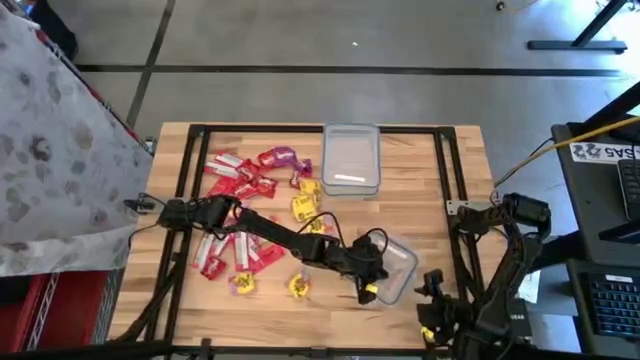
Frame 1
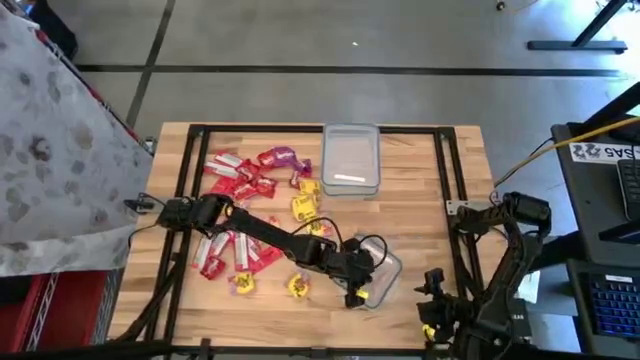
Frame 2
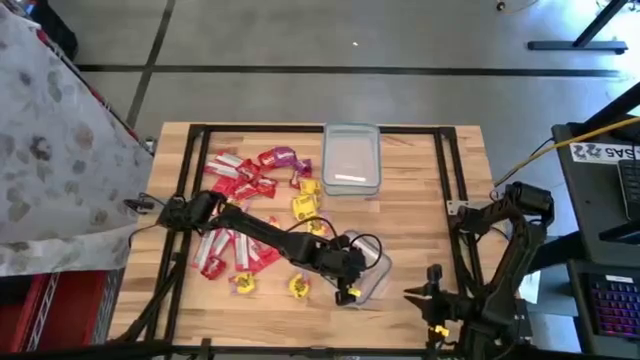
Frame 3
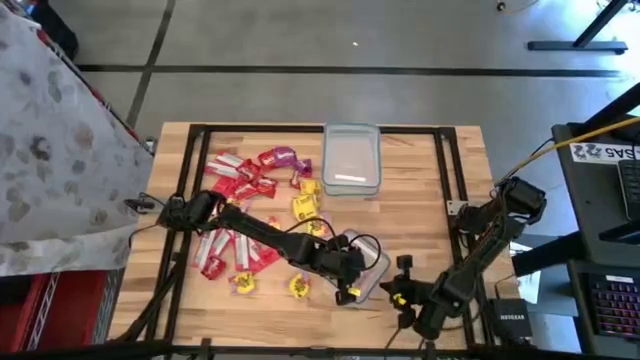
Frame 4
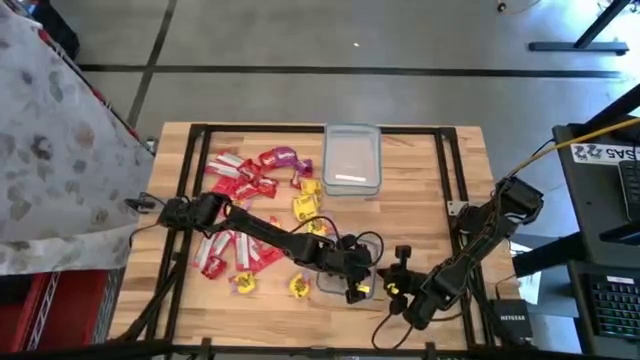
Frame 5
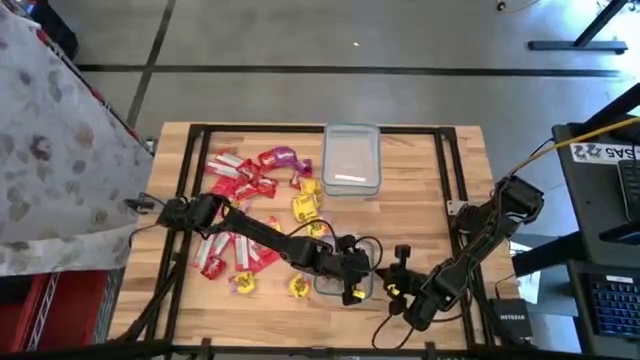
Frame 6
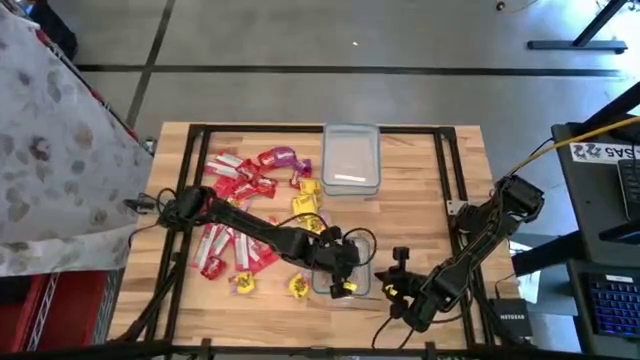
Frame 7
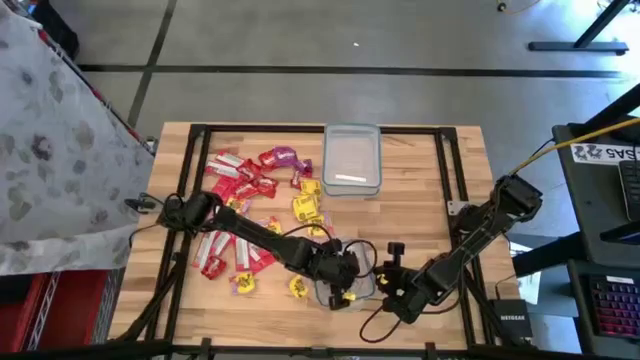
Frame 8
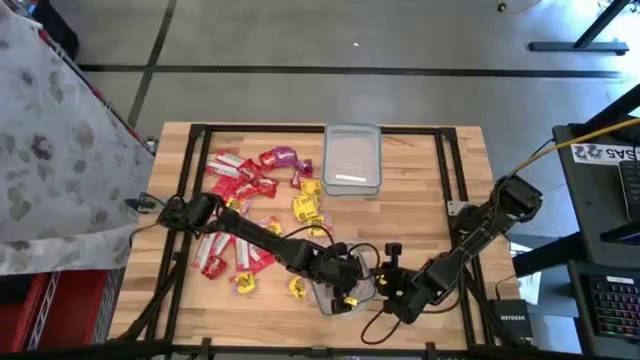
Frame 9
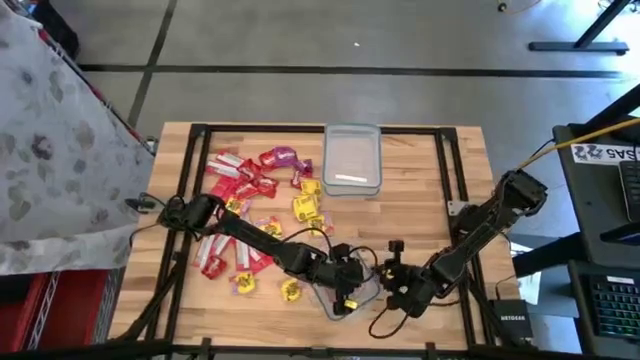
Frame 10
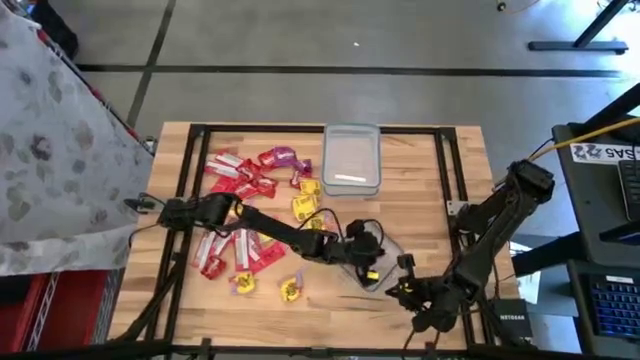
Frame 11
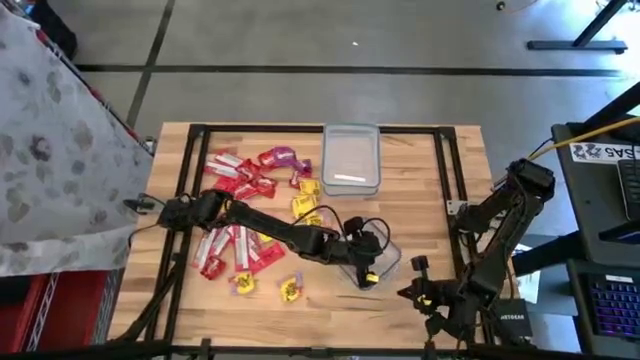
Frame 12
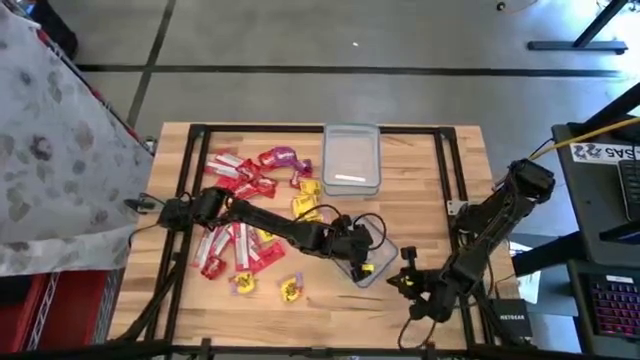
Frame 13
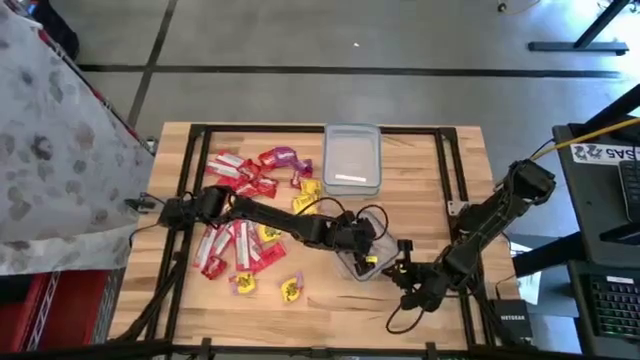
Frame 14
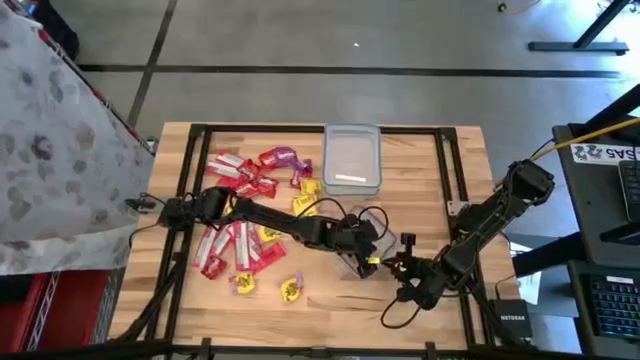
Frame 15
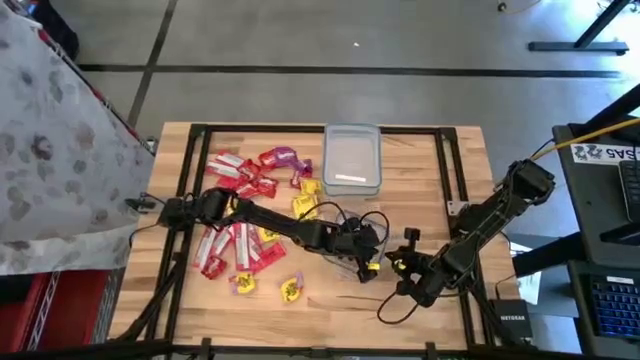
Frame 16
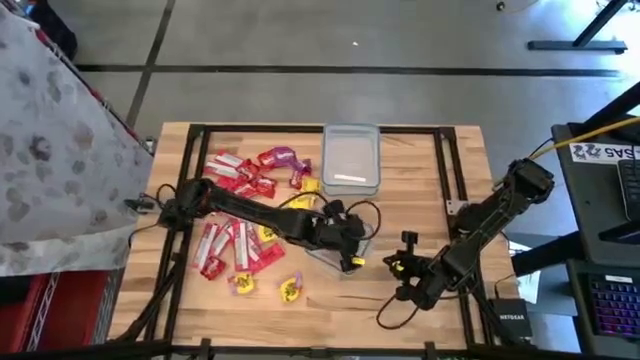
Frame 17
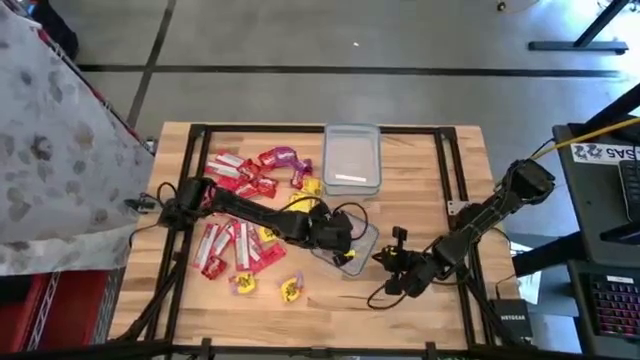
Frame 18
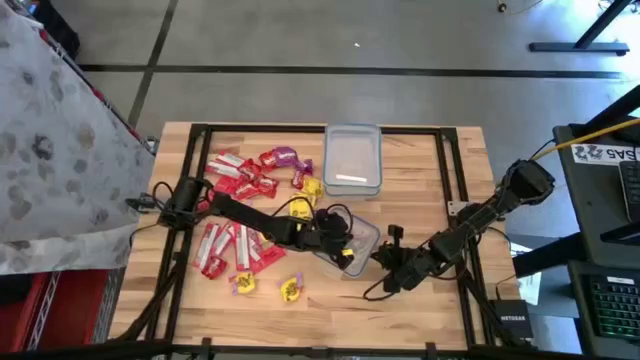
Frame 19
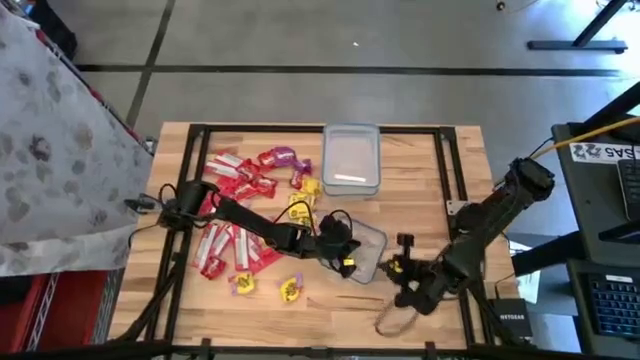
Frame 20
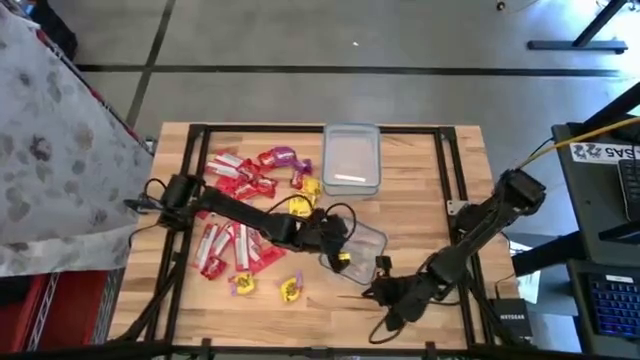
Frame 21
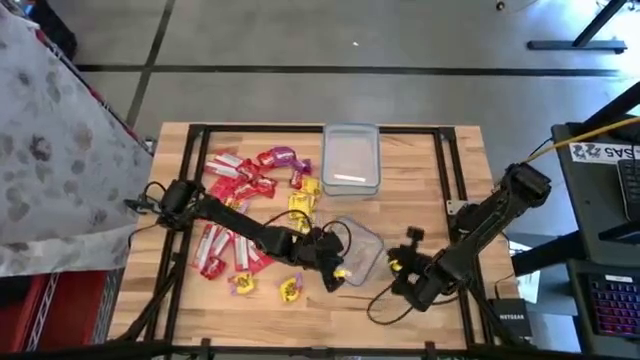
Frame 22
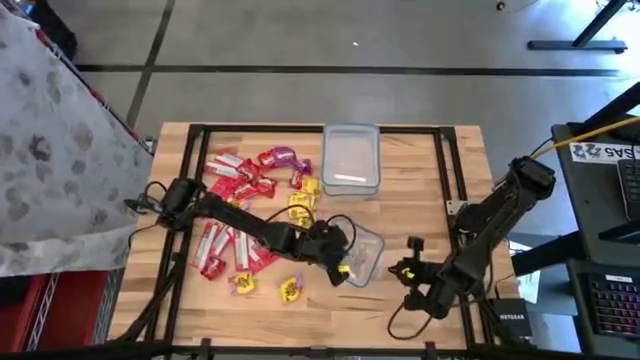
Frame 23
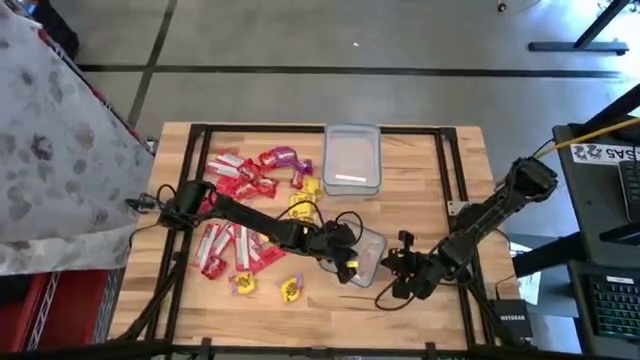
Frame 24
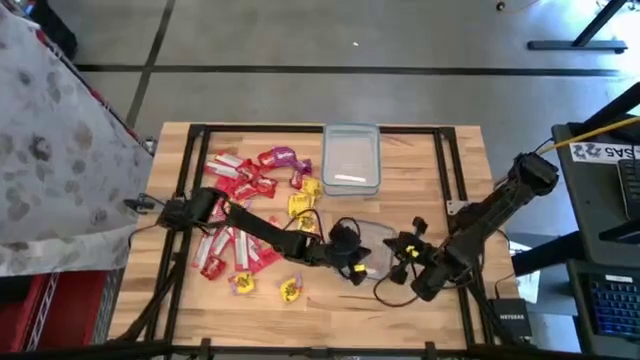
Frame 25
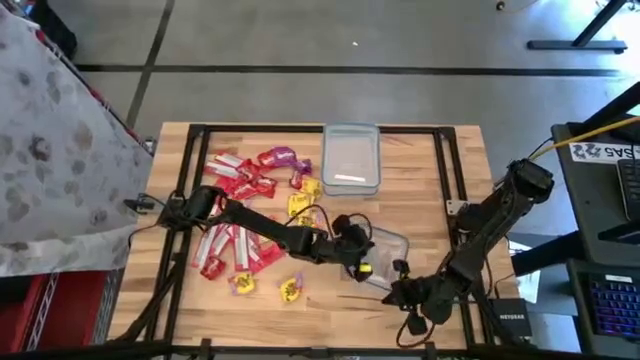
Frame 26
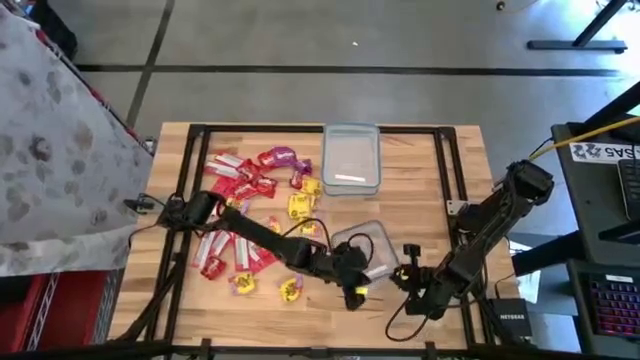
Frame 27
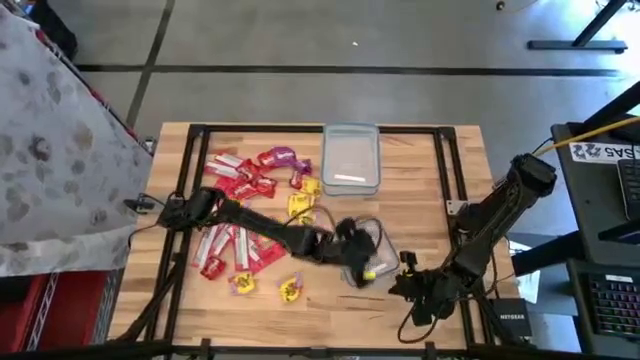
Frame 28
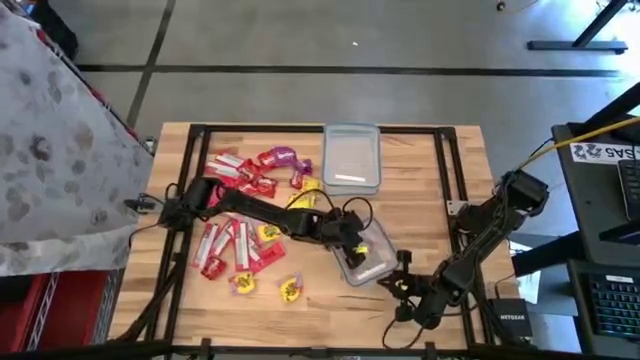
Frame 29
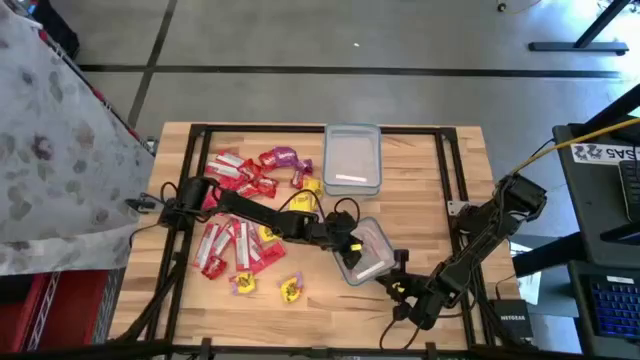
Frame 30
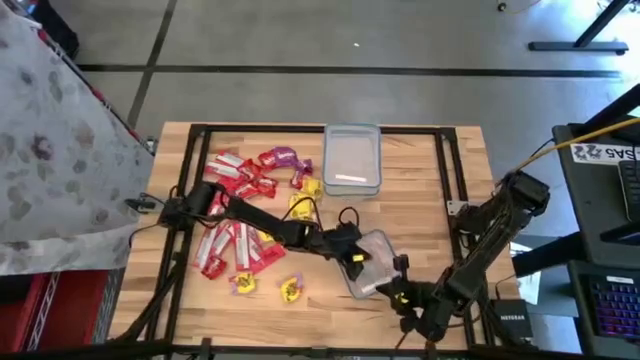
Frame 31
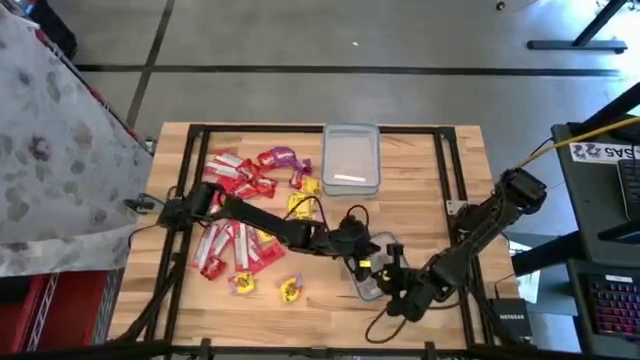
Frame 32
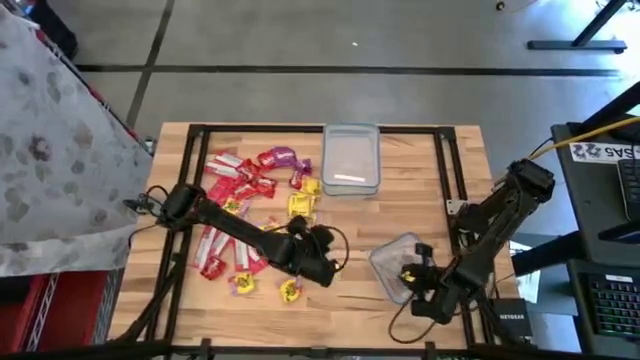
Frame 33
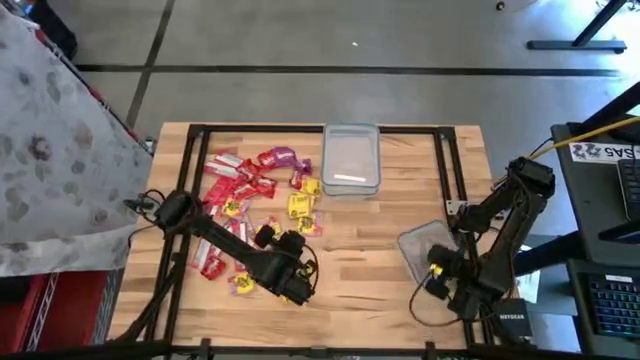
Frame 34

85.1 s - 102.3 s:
Task: Sort candy
Close the square transparent food container

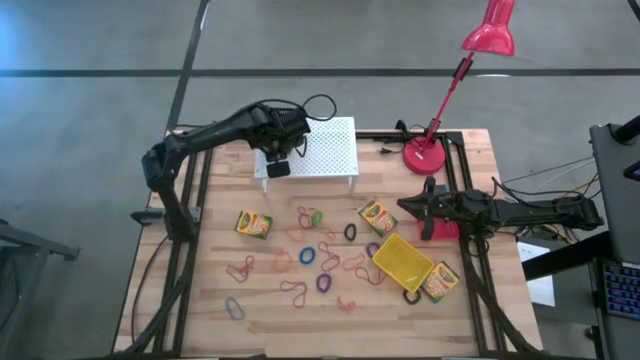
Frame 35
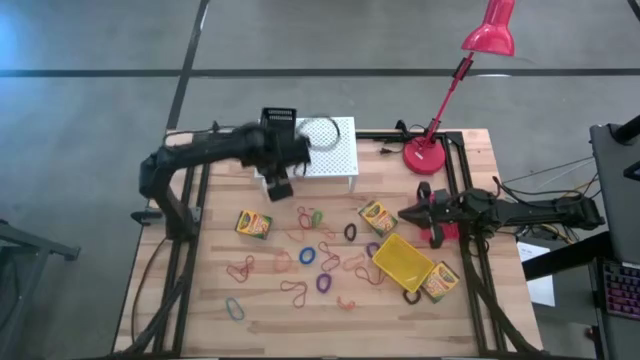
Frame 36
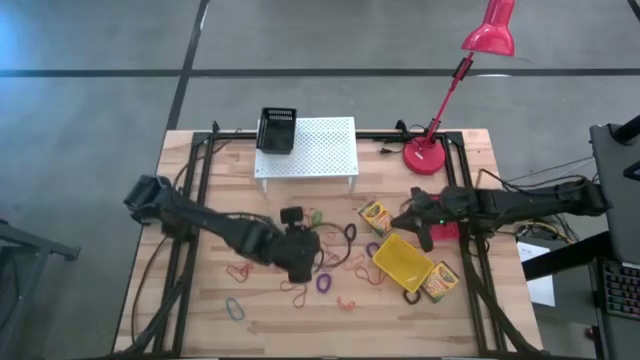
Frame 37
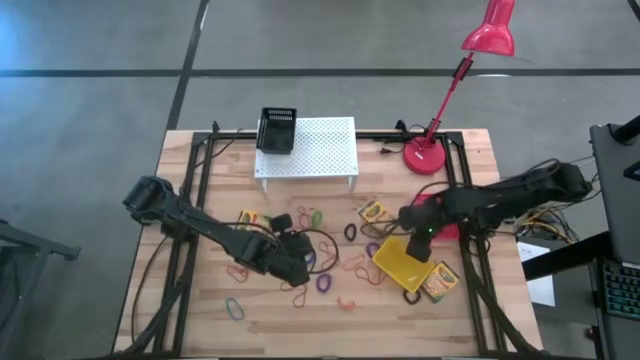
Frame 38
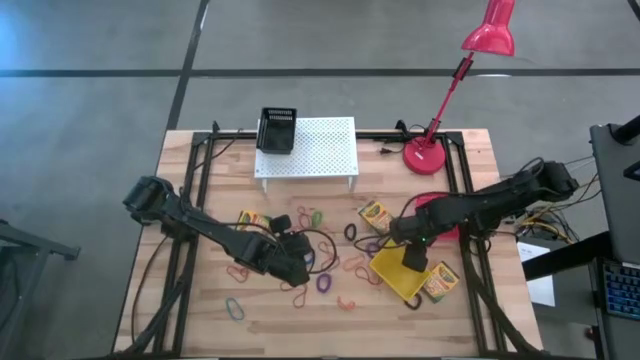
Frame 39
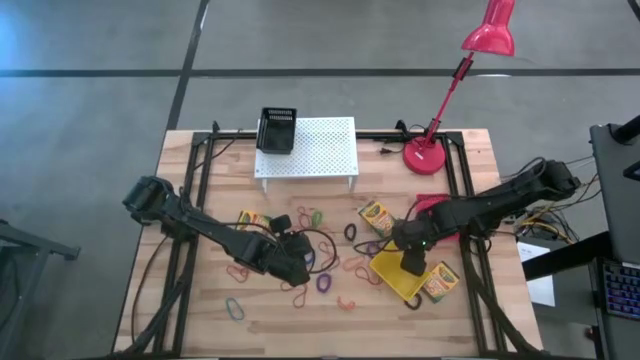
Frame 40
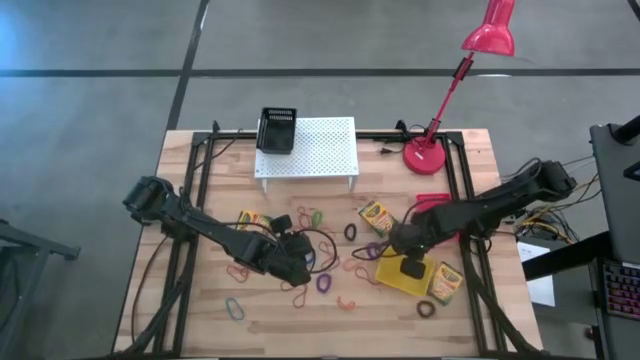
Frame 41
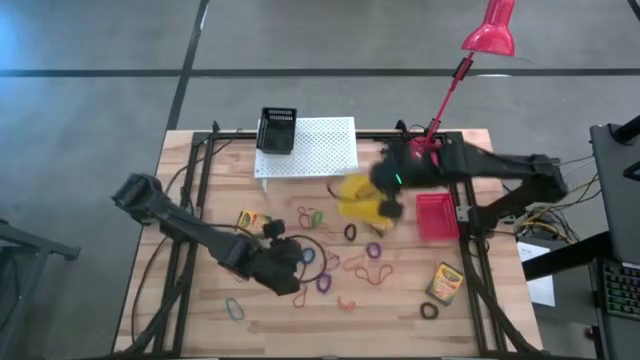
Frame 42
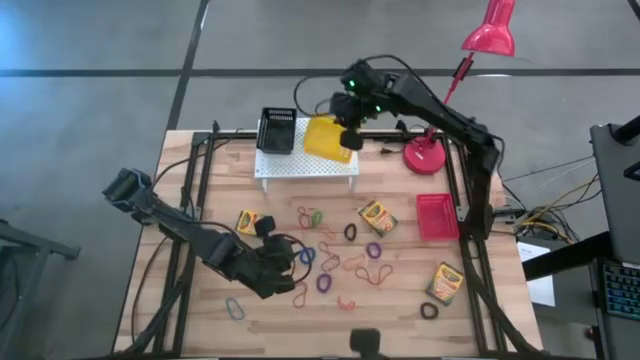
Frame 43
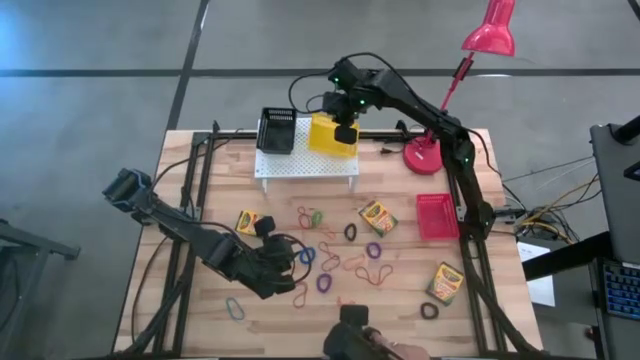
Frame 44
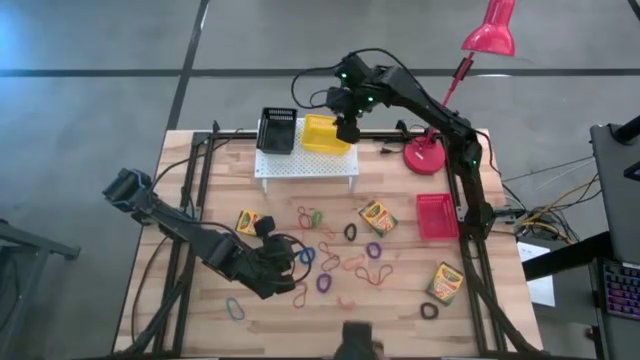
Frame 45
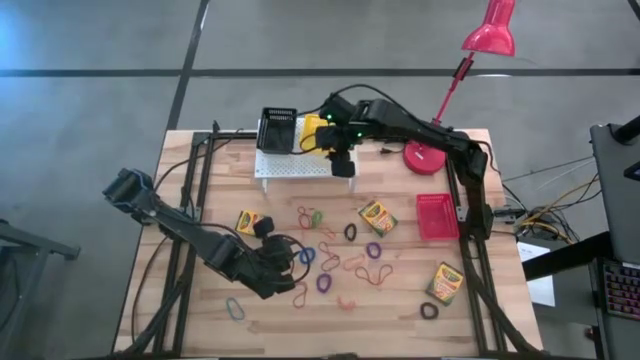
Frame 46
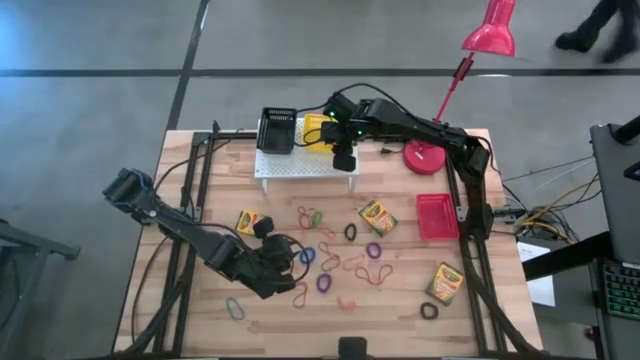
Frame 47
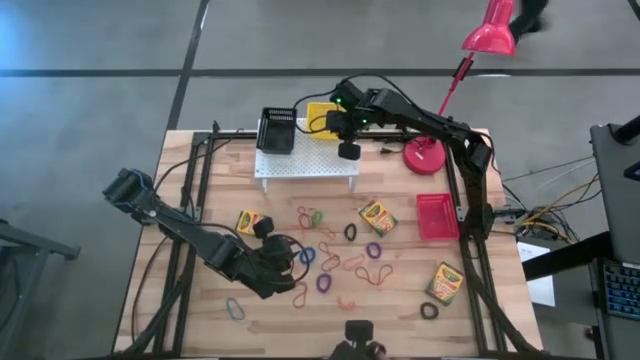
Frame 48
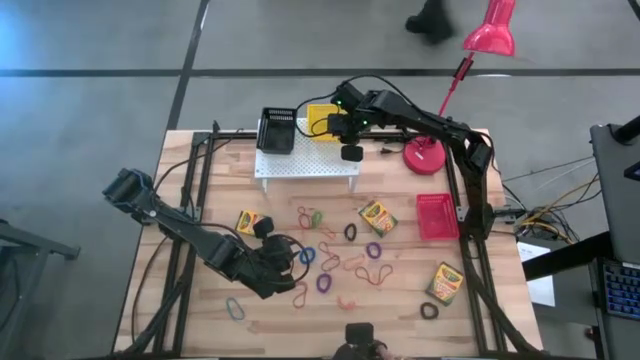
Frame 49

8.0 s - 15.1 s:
Task: Pick & Place Office Desk Supplies
Put the yellow bin on the shelf
